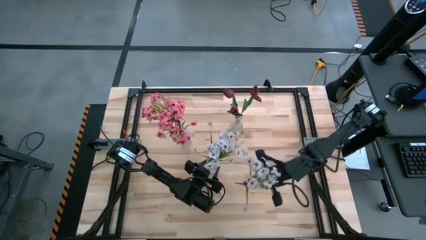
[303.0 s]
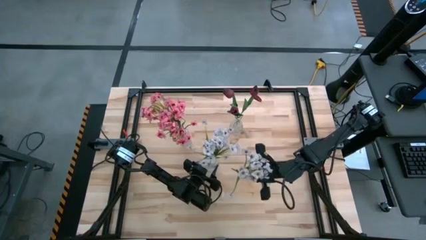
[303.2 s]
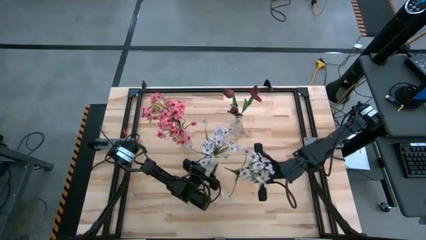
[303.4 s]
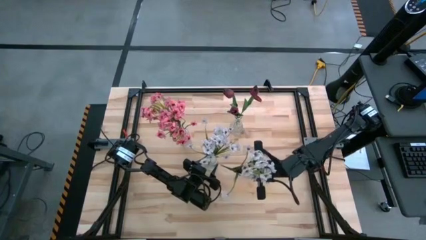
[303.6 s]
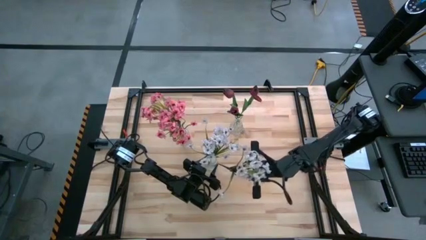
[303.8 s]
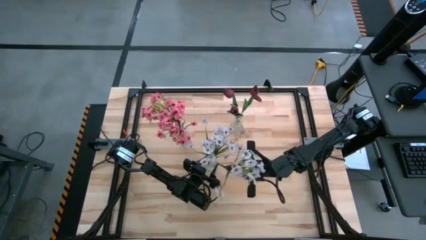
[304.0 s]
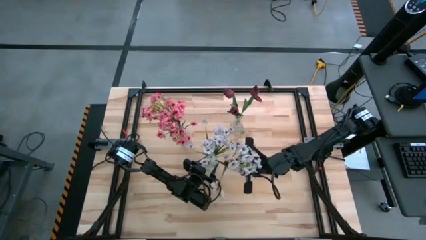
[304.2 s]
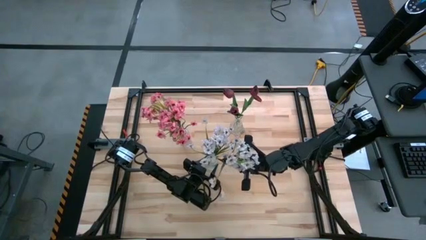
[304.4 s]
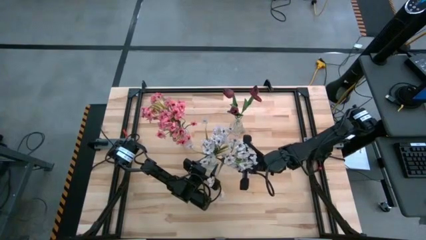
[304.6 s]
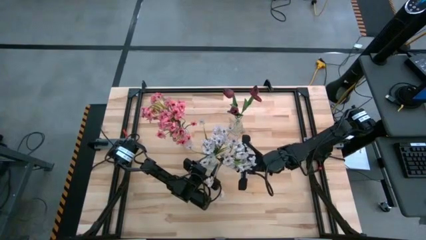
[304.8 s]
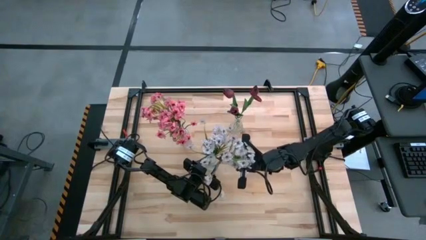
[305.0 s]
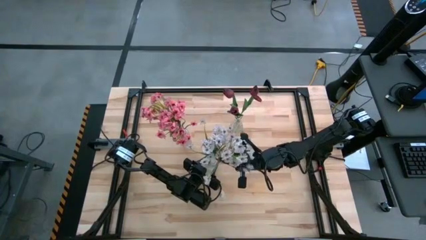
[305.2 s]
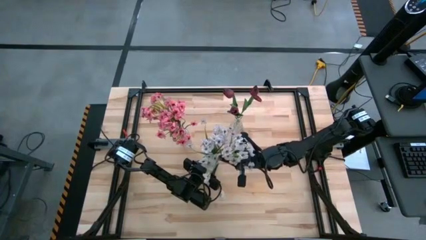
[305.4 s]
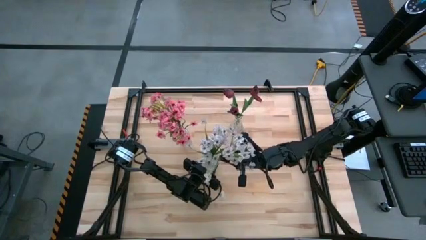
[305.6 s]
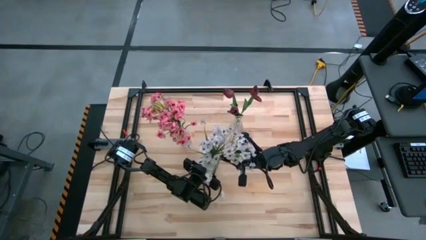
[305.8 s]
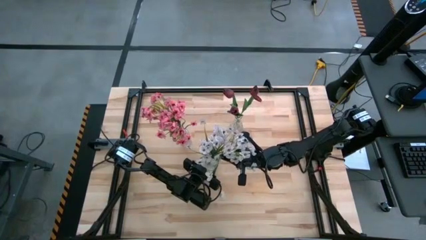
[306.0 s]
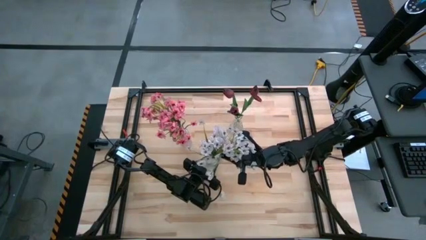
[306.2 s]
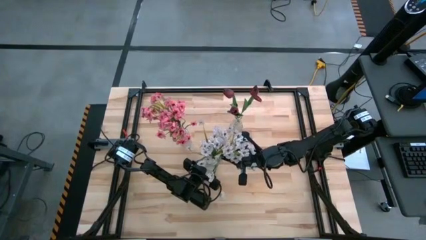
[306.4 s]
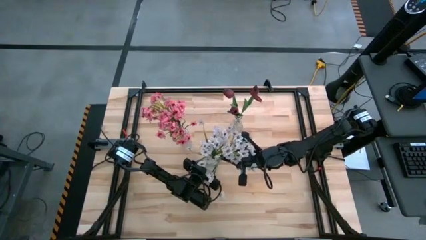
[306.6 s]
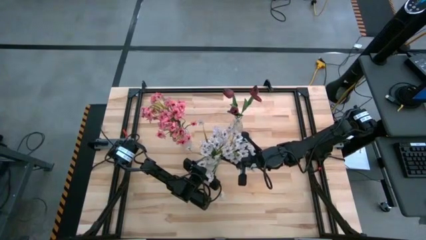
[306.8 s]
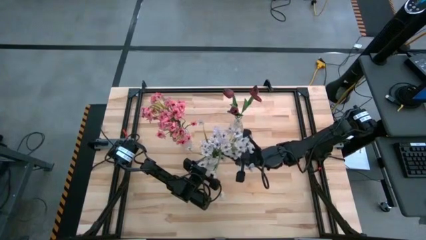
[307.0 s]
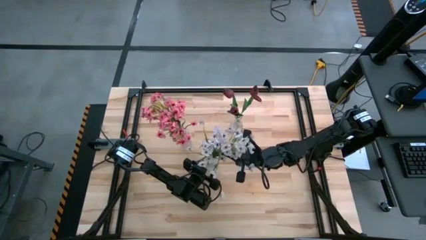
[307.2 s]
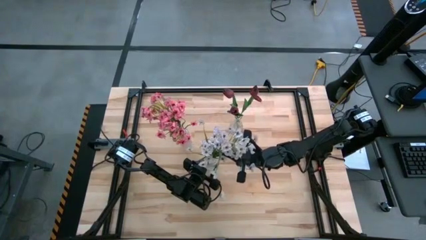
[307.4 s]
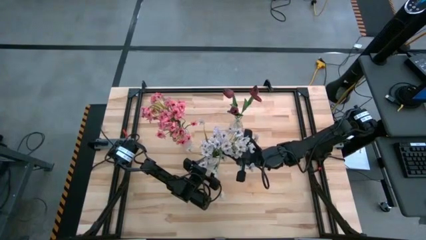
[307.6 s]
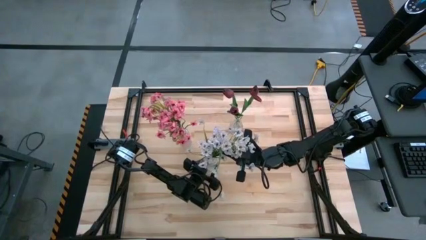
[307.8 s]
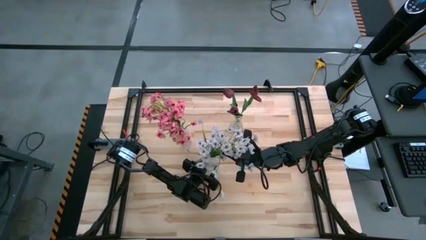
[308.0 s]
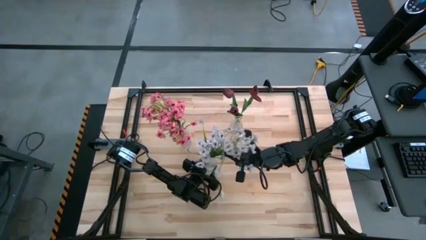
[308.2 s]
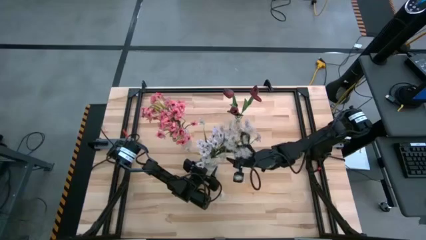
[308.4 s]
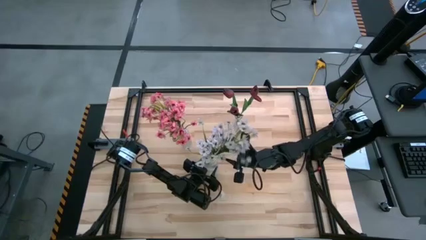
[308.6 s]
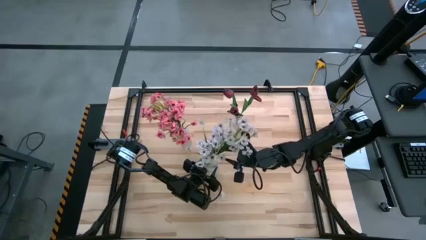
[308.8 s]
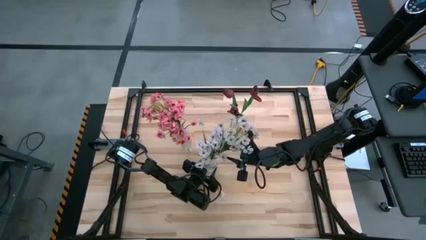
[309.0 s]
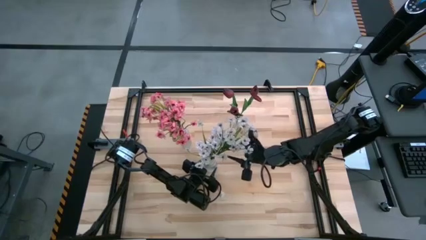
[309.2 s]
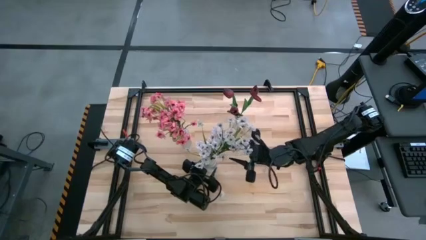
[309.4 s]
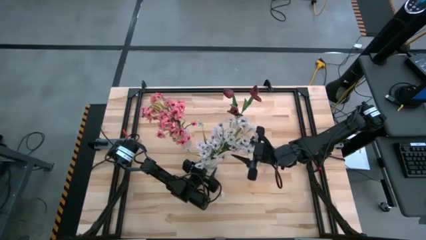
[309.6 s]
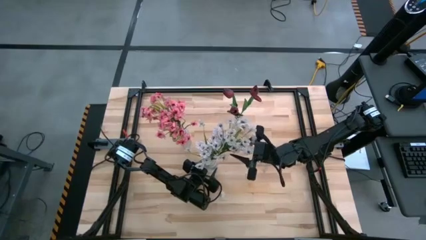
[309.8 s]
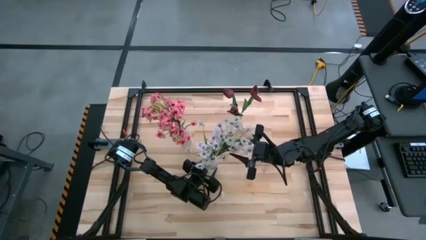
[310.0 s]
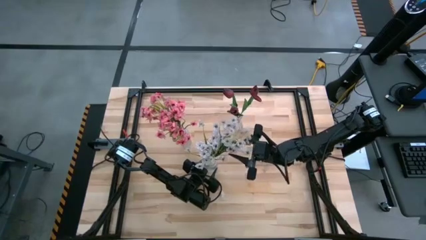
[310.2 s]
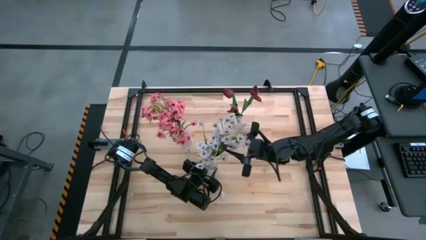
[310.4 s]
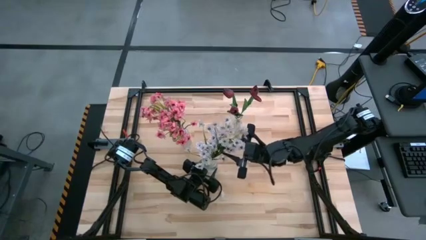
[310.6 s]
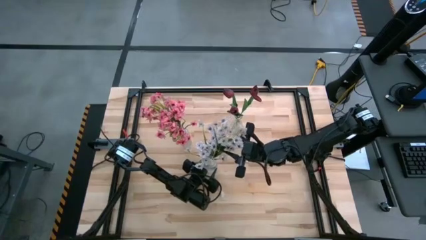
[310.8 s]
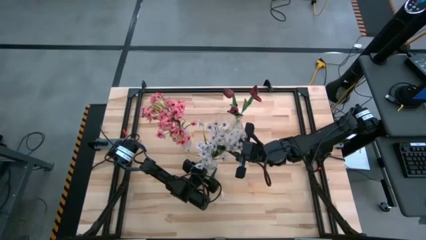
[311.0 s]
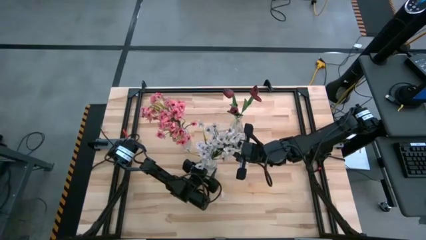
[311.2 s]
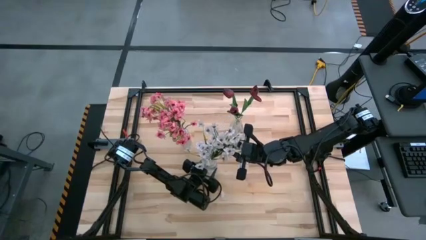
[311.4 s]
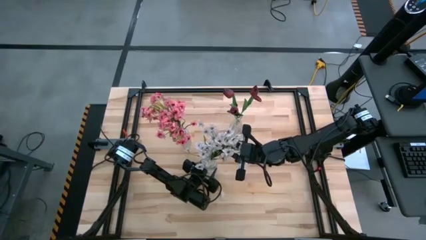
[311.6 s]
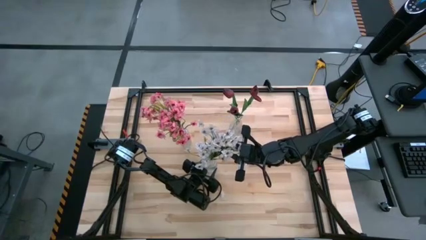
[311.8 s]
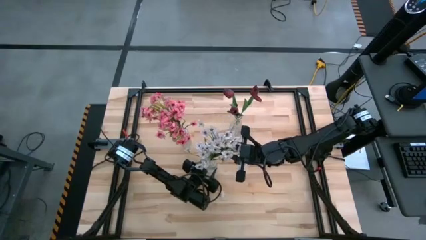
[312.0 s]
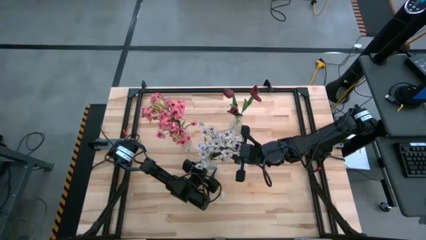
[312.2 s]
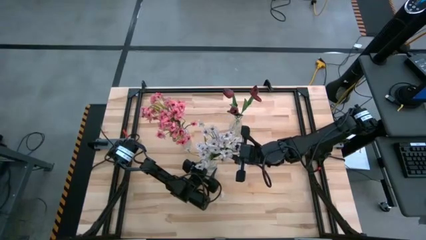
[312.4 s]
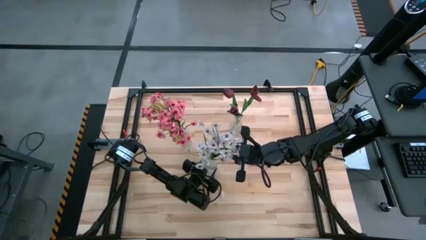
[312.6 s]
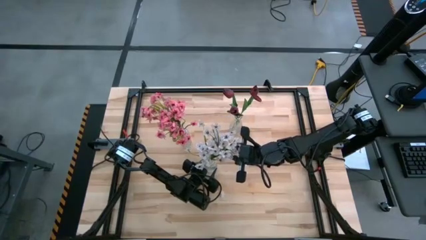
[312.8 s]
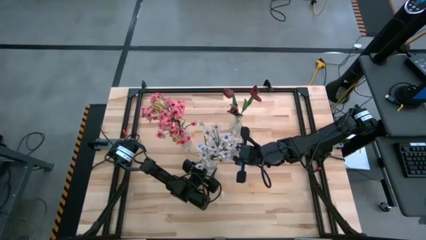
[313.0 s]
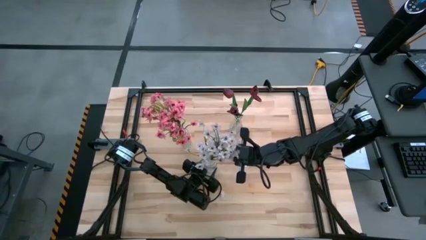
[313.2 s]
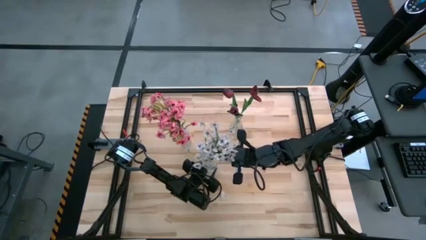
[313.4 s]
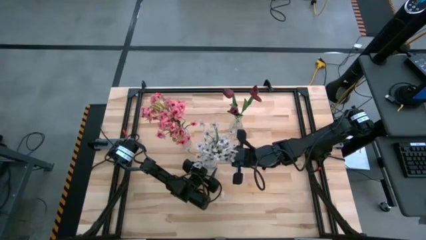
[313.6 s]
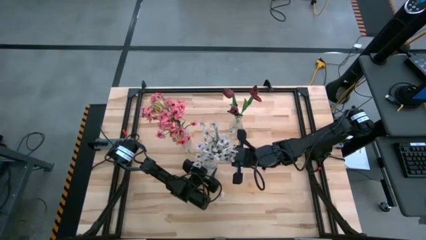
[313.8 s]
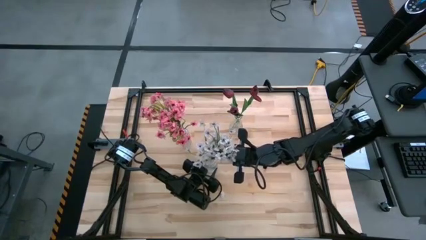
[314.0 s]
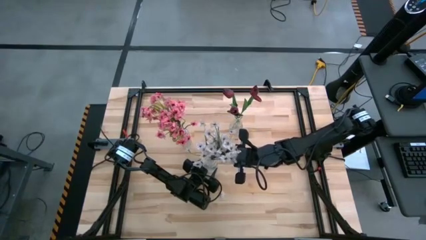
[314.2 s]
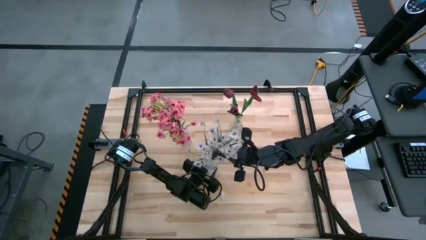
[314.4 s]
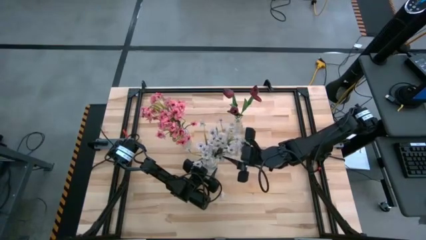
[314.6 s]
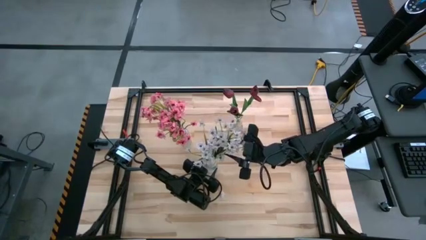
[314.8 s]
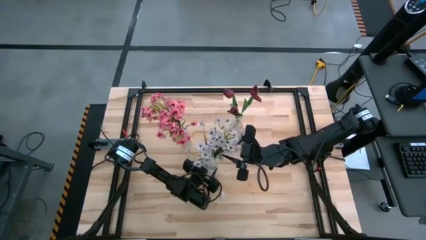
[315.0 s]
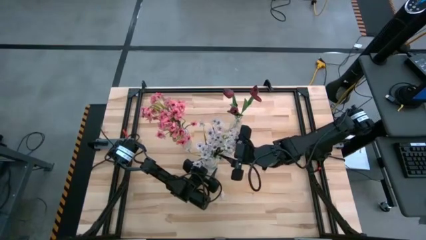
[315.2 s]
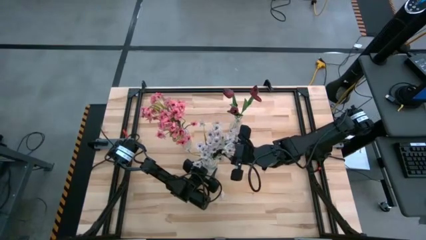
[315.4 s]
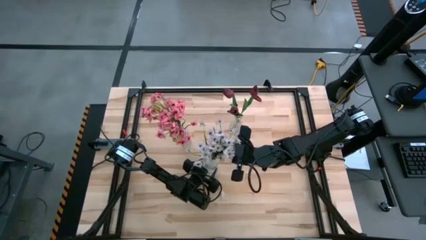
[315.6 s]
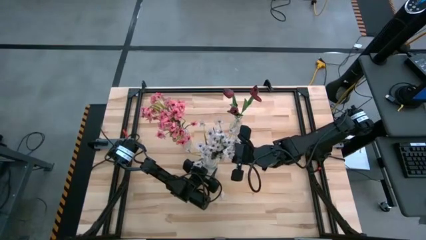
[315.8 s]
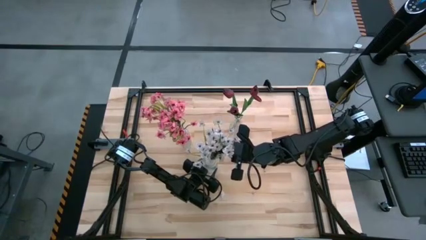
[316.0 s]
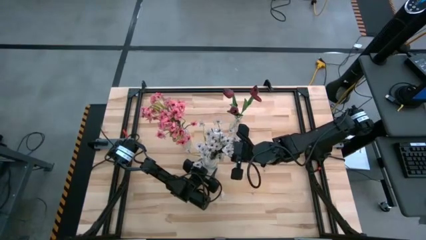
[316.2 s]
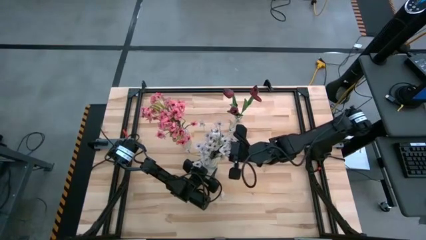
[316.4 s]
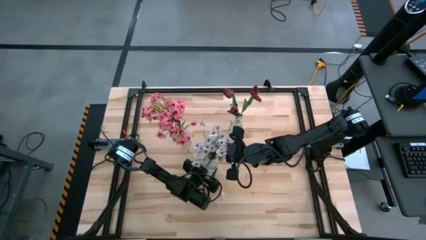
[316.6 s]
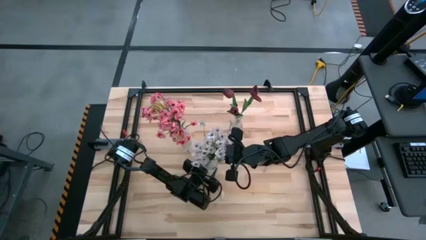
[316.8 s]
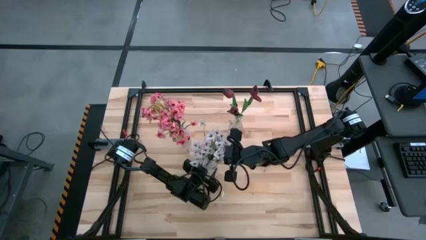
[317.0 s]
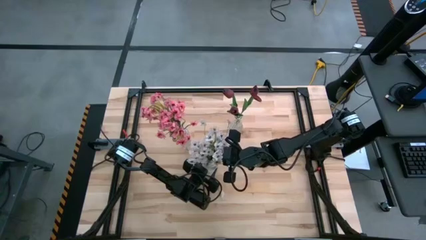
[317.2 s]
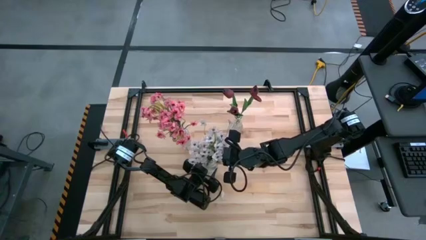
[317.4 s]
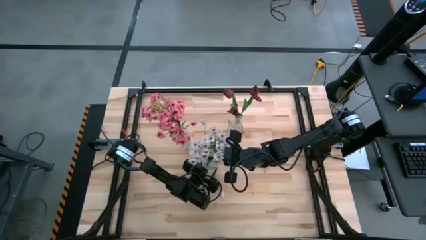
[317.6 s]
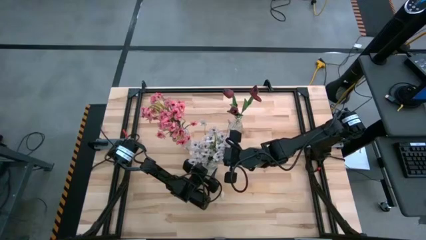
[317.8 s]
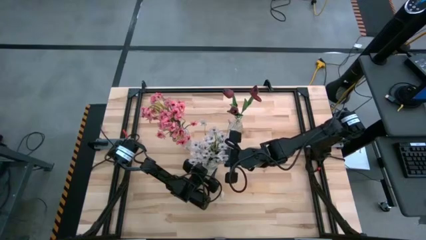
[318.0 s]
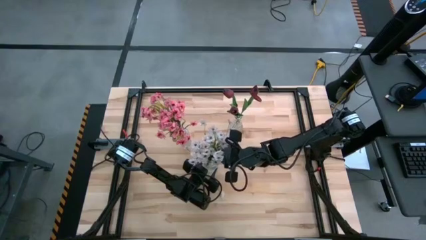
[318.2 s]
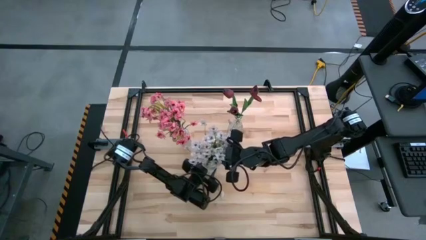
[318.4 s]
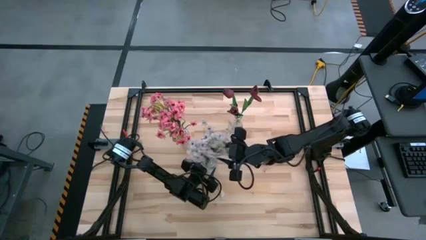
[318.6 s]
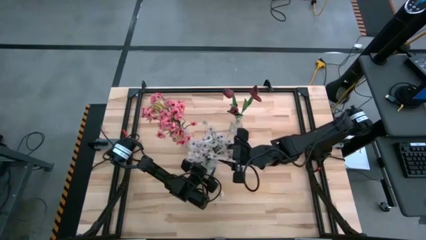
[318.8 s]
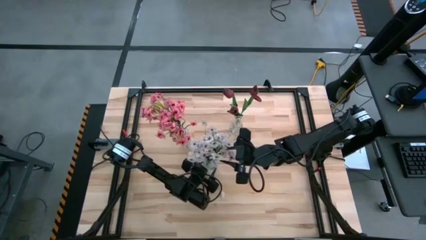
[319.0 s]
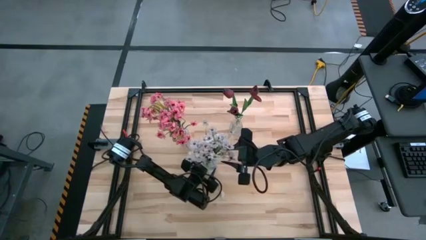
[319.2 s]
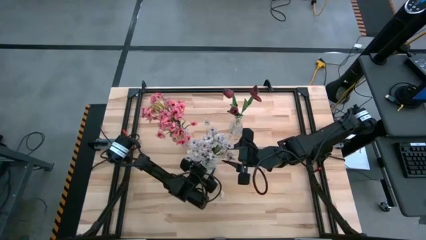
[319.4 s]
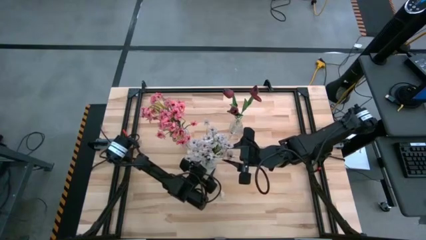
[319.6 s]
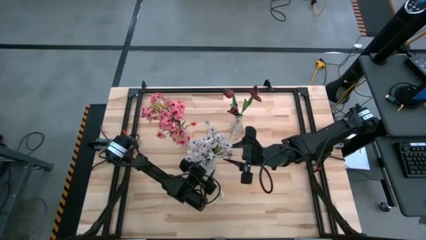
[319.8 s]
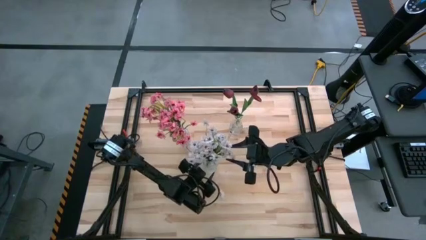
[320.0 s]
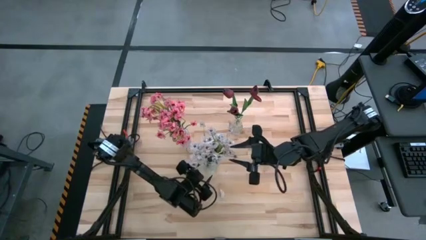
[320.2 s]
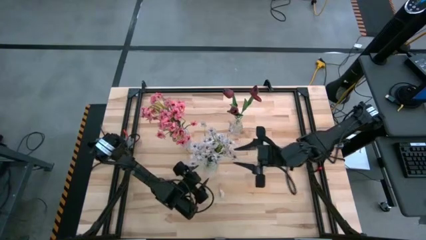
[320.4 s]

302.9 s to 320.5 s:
Task: Sort flowers into vase by color
Put the white flower into the top transparent vase
